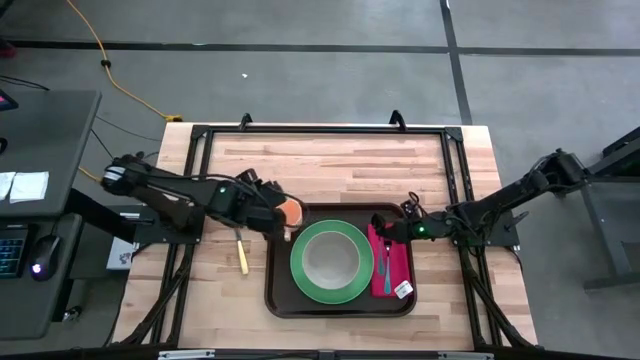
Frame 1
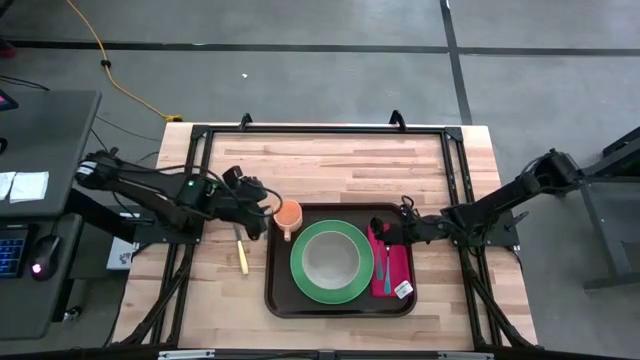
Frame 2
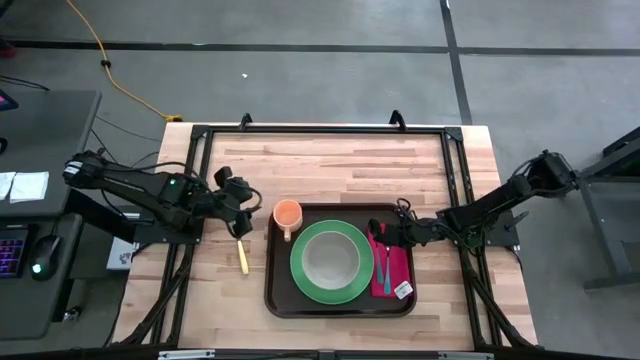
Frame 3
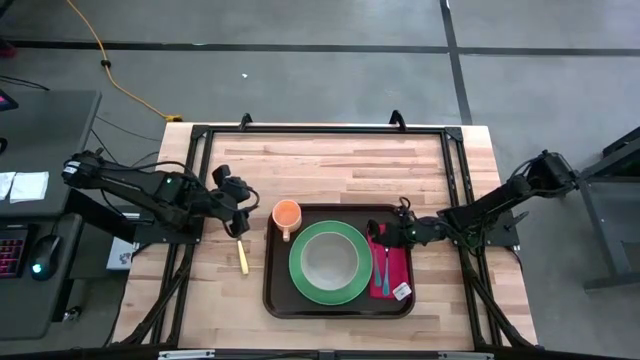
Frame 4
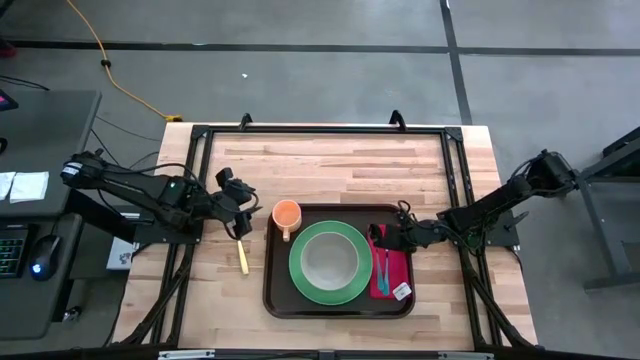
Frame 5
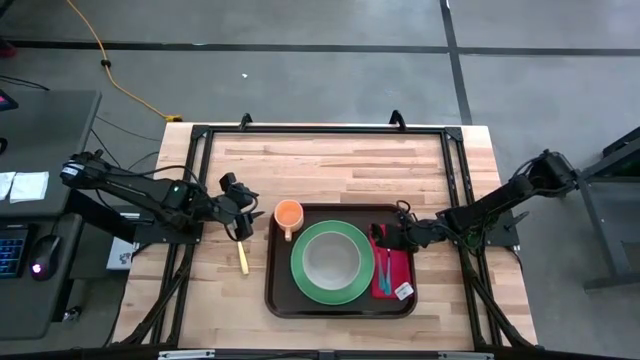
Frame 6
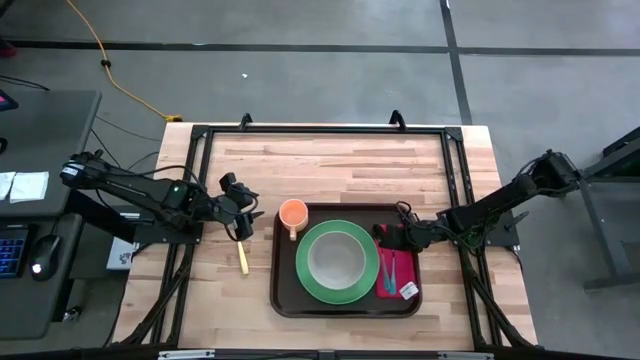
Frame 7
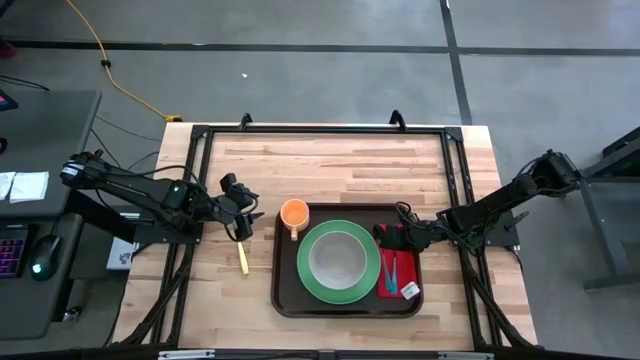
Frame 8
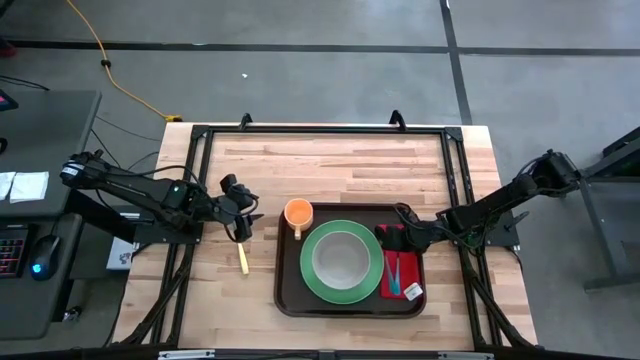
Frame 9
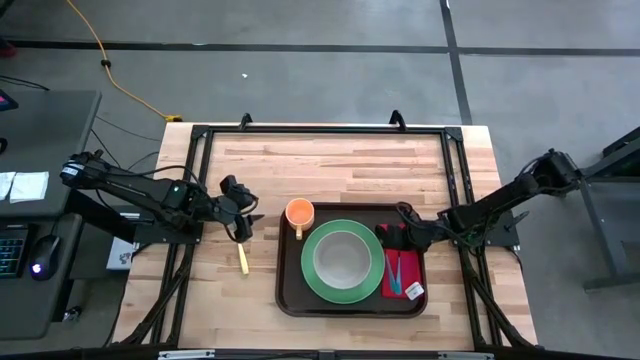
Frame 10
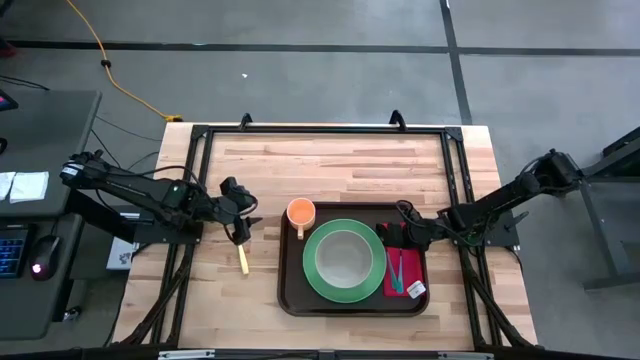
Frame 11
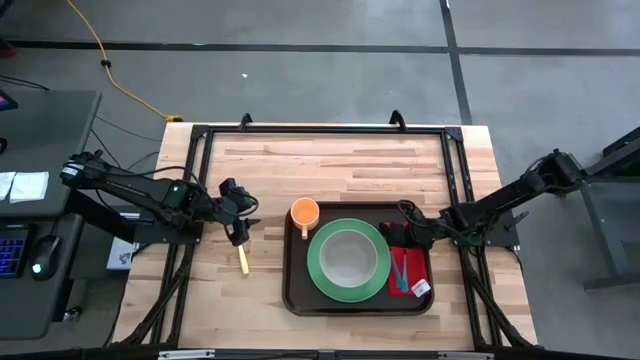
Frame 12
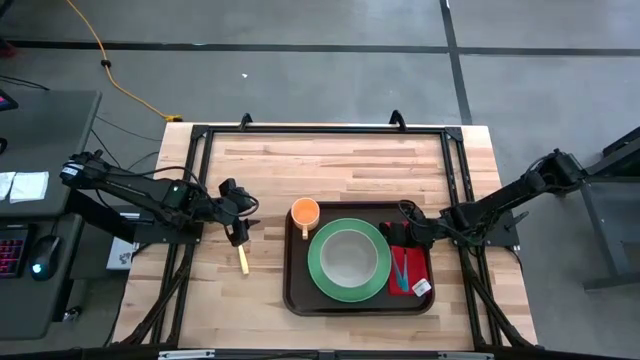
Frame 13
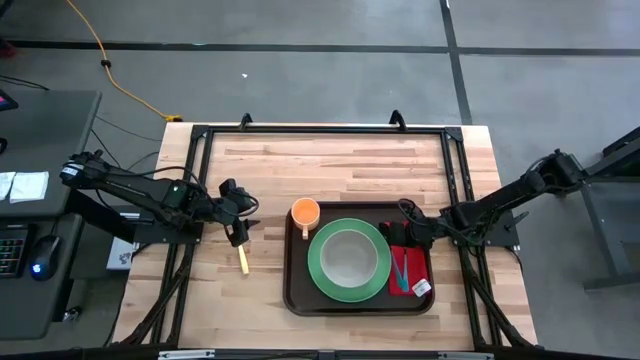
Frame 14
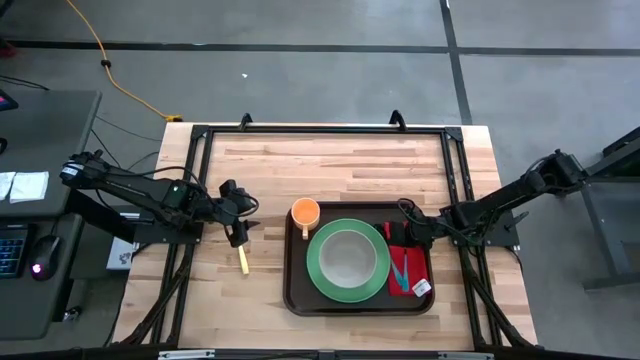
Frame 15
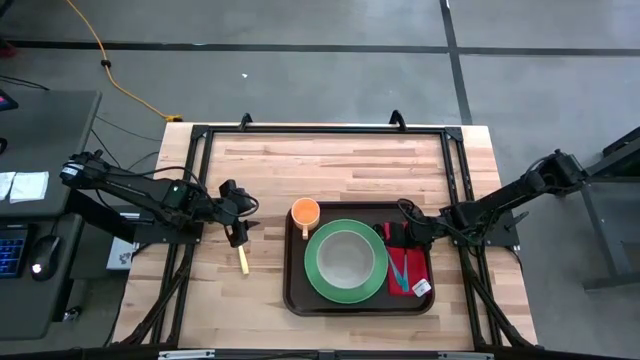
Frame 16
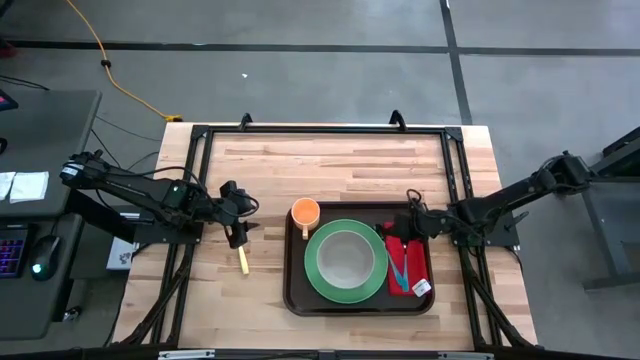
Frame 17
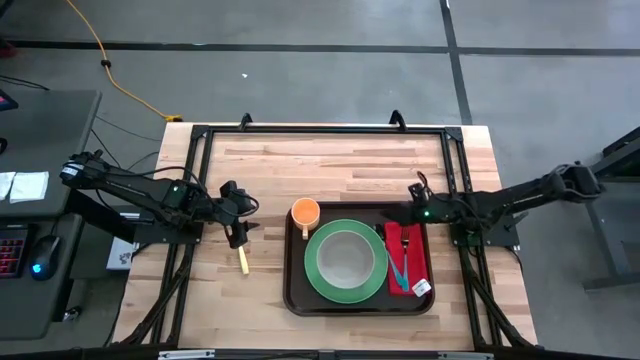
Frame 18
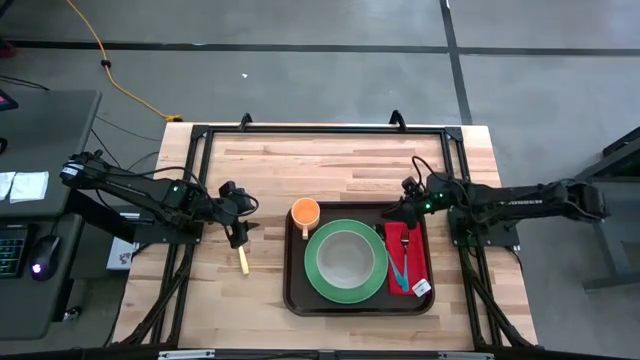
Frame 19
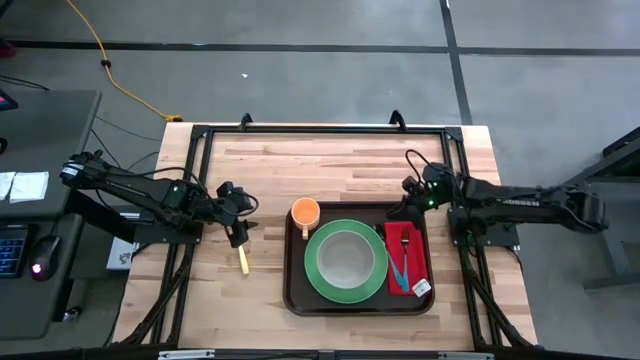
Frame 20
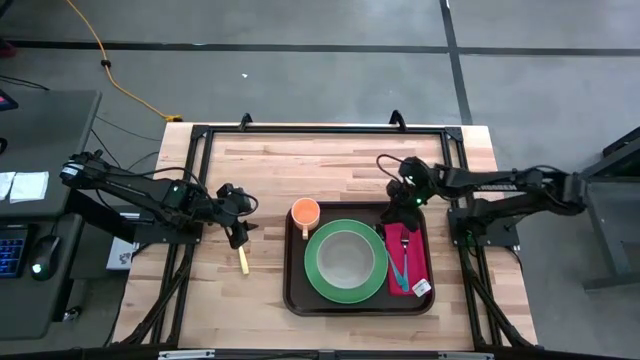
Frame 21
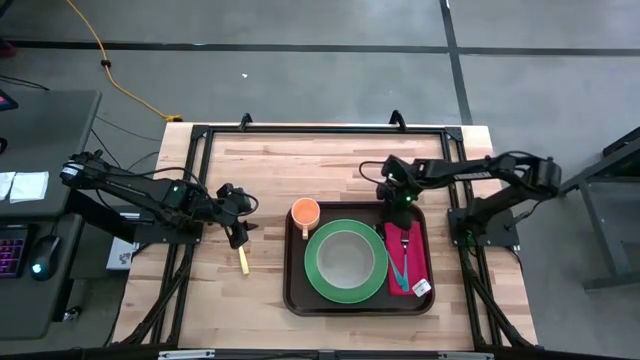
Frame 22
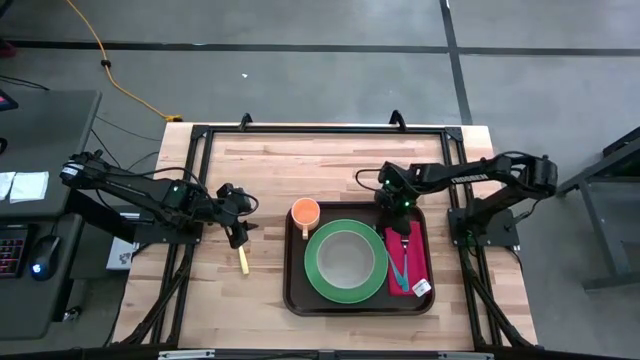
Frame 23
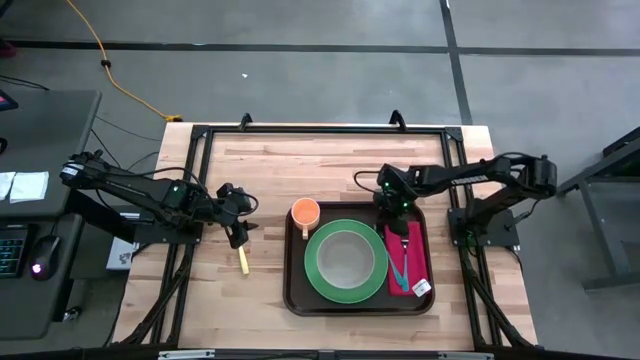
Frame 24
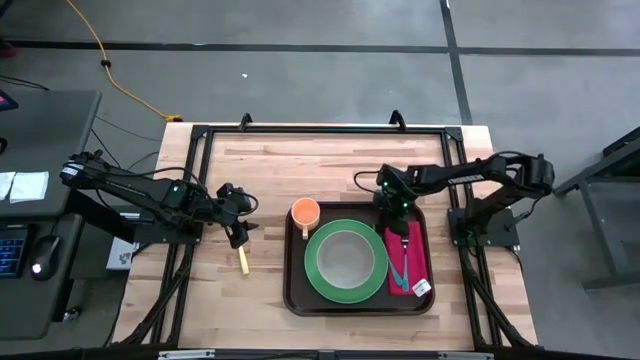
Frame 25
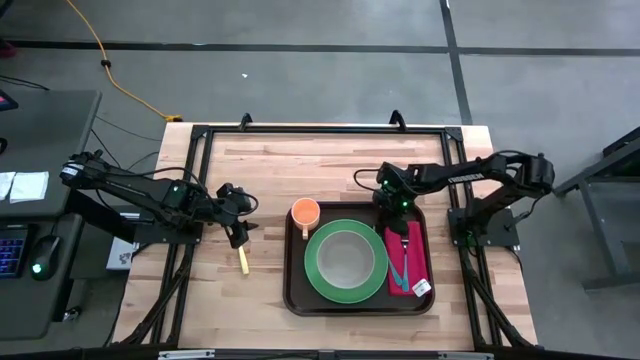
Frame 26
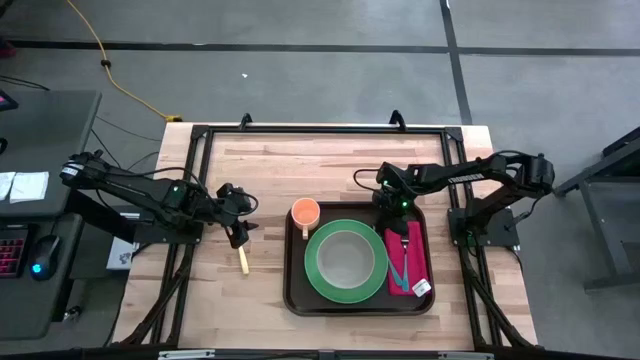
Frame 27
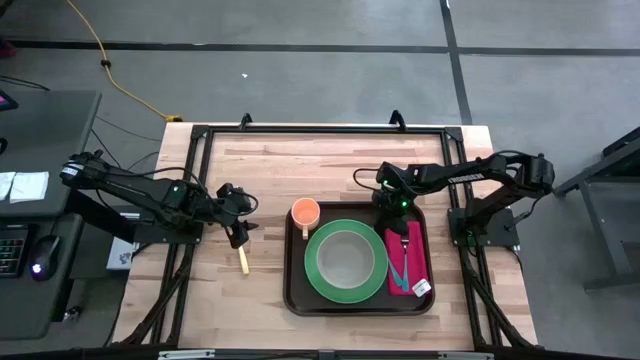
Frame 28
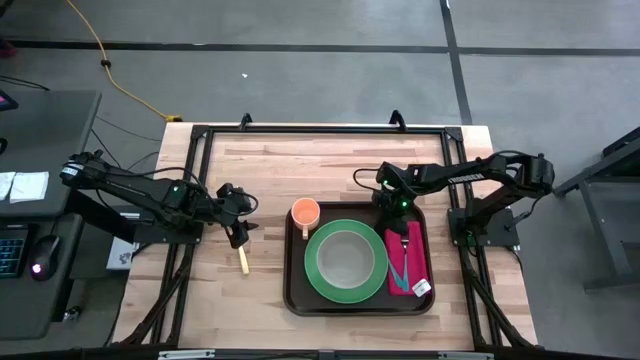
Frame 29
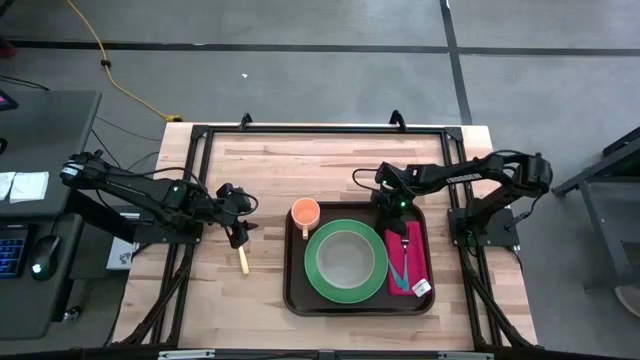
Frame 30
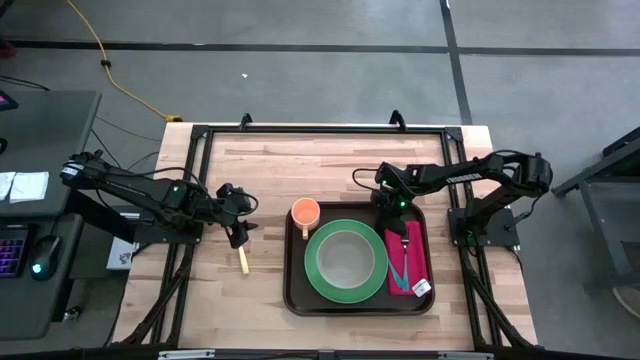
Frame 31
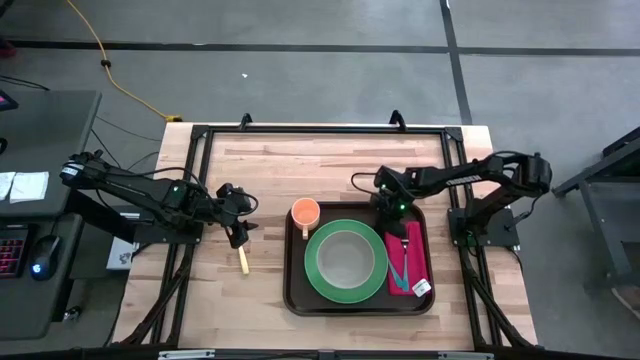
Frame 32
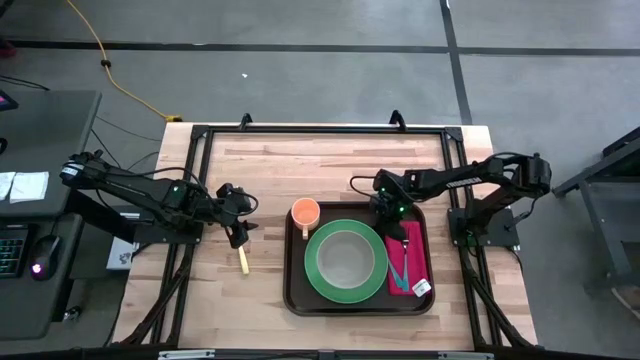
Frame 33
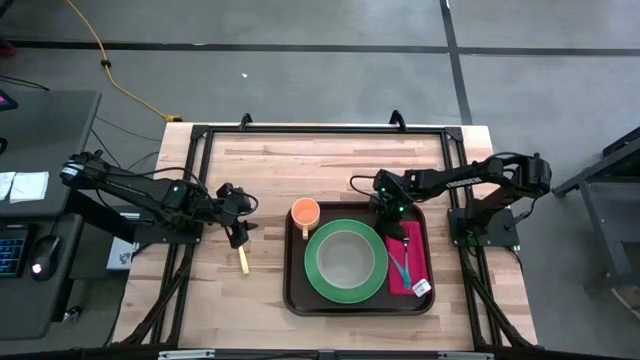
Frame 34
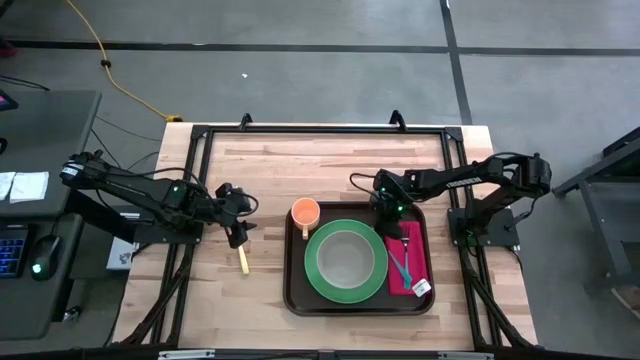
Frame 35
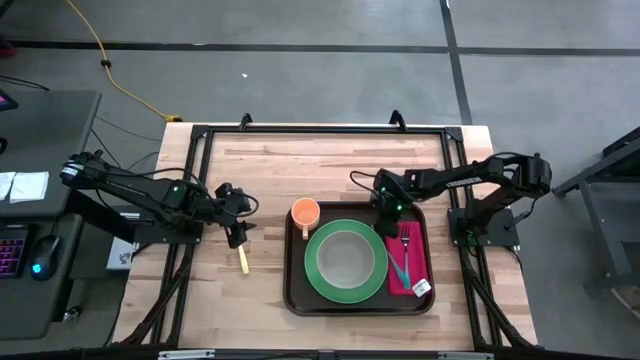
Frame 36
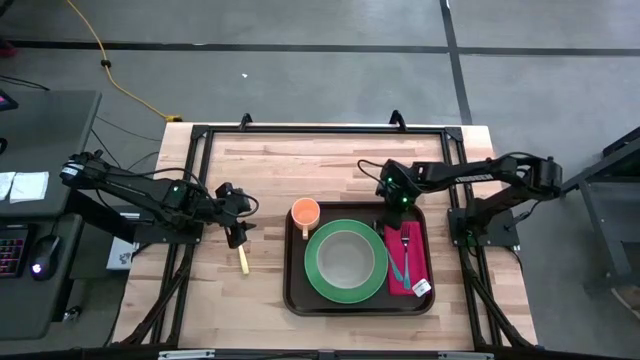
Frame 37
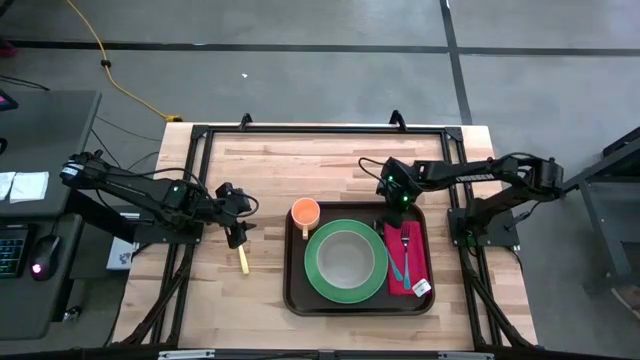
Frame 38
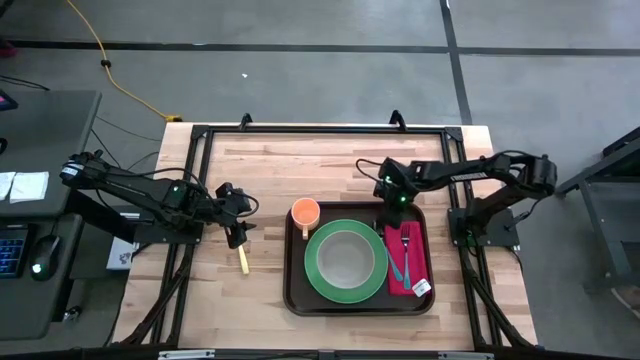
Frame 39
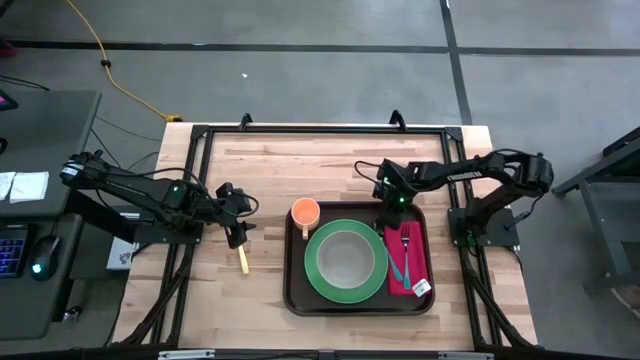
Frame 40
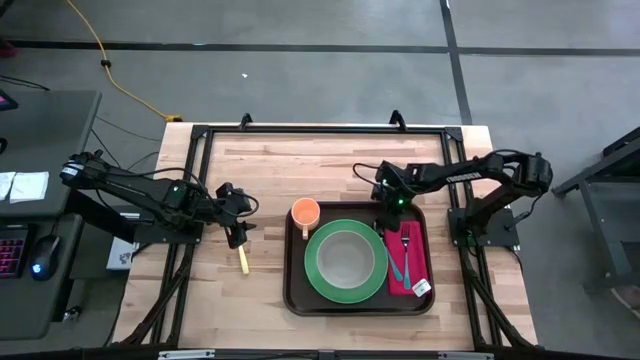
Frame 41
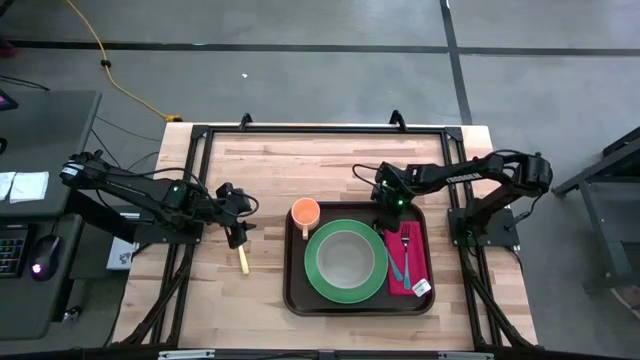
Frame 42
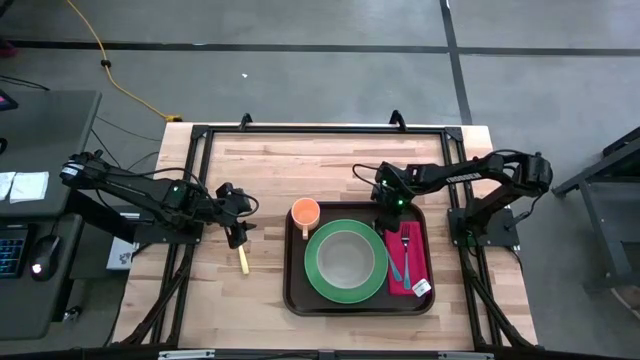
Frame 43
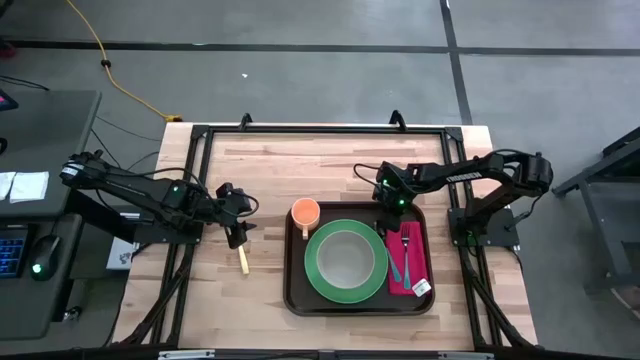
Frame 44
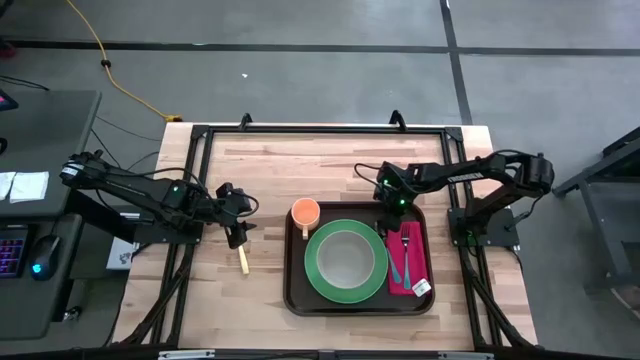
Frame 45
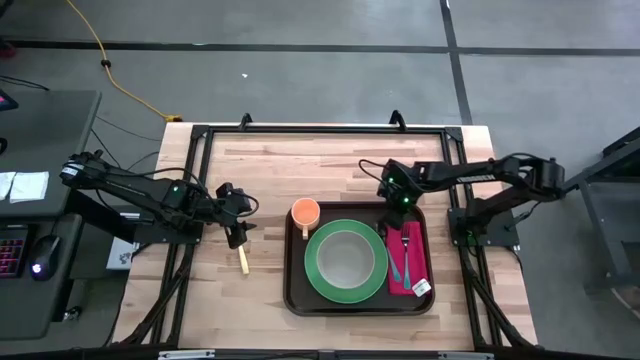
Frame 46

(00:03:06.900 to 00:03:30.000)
Task: Set up tray
Put the blue spoon to the left of the blue fork on the red napkin
